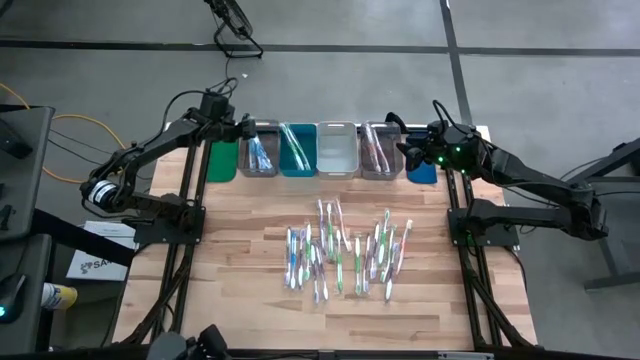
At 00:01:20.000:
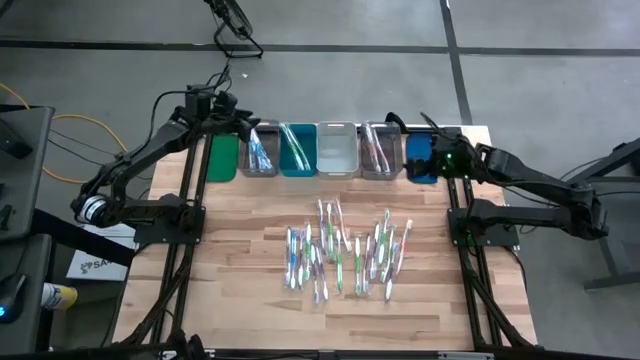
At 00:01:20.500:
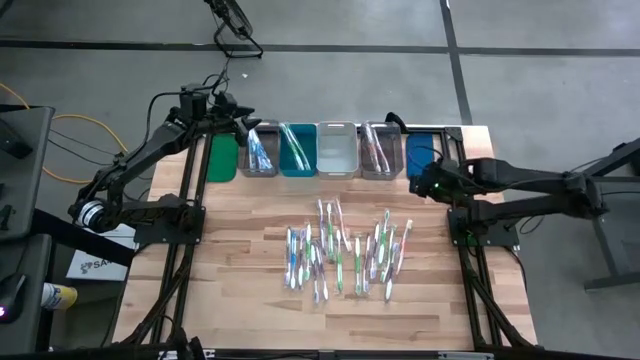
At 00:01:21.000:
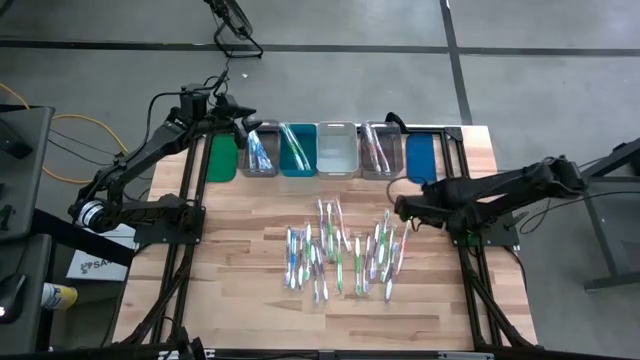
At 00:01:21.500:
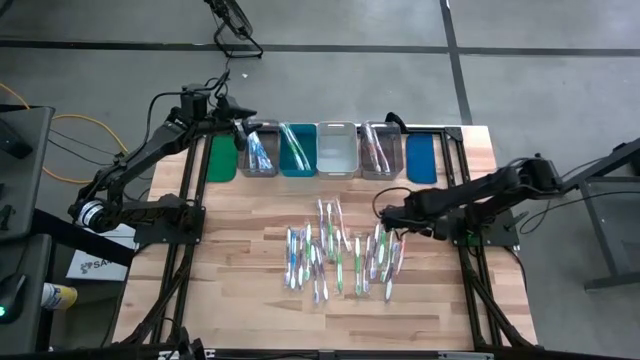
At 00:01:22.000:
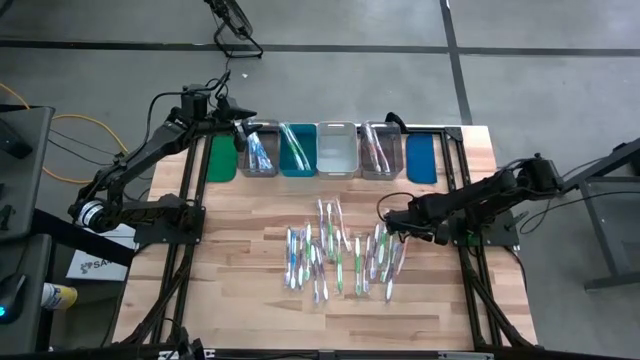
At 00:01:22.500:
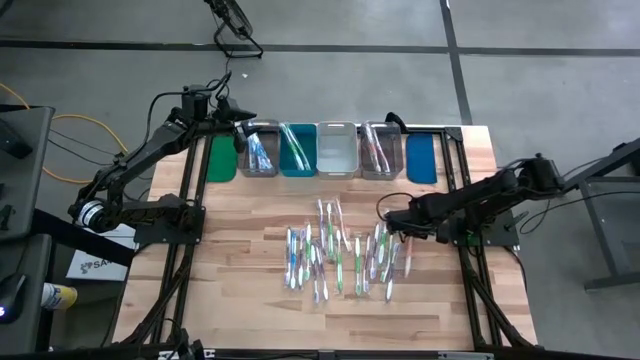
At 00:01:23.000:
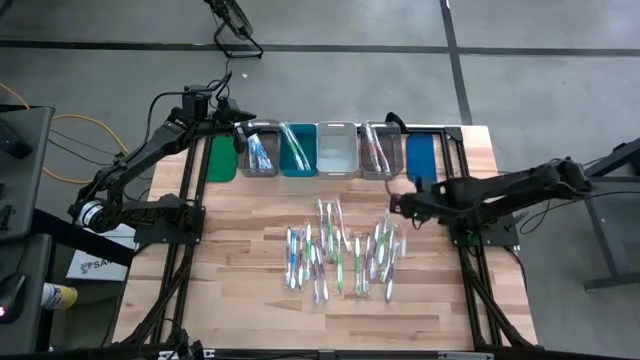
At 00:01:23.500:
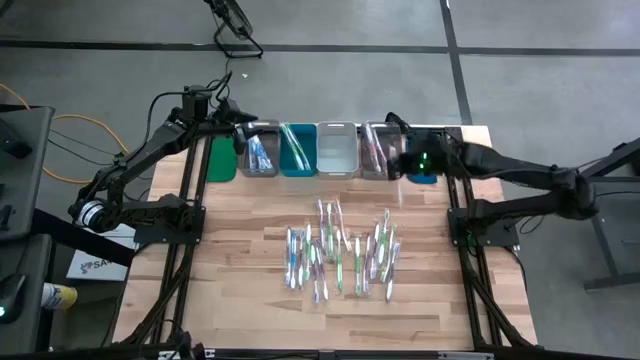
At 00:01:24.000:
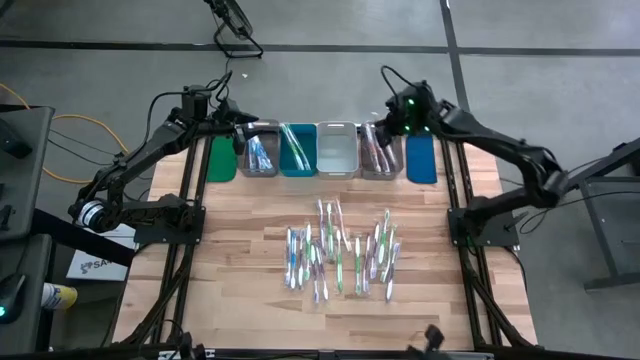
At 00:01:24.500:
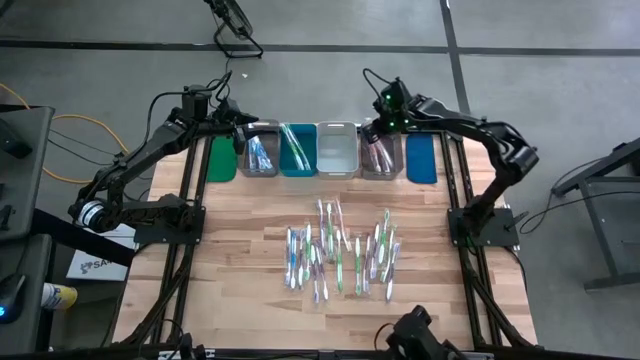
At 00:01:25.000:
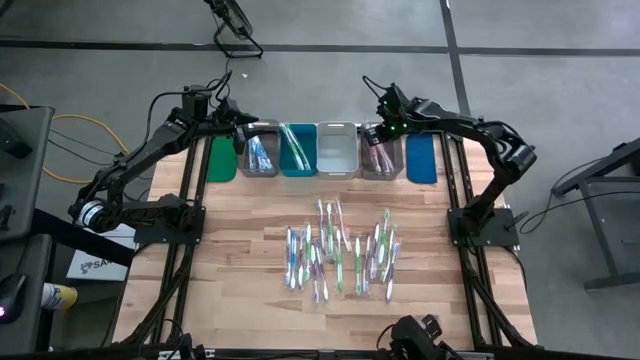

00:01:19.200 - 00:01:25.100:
Task: Pick & Place Toothbrushes
Put the orange toothbrush into the right black bin

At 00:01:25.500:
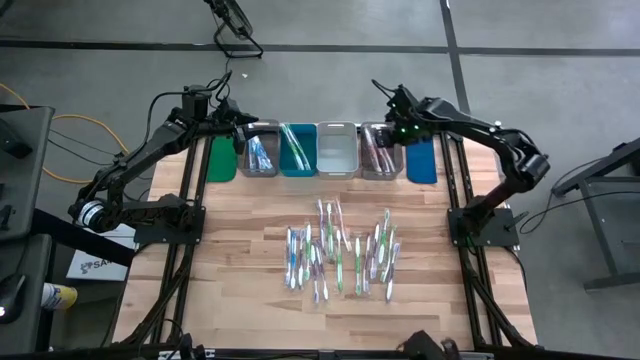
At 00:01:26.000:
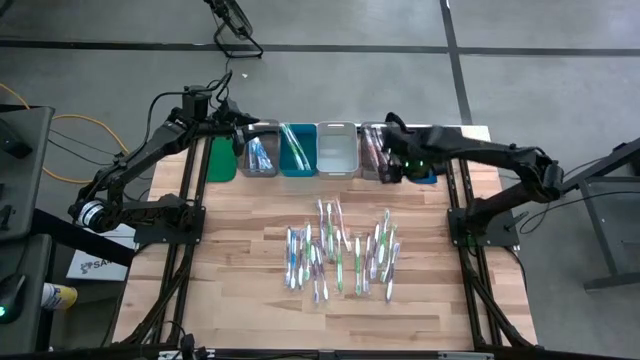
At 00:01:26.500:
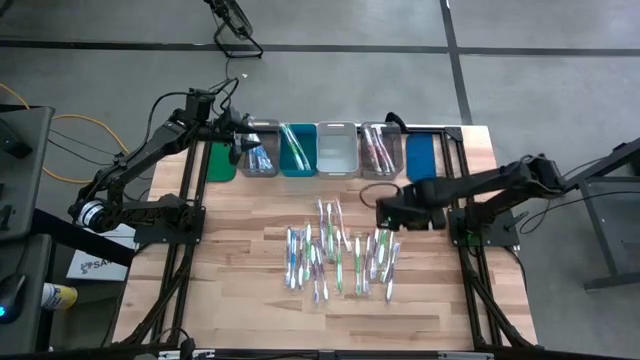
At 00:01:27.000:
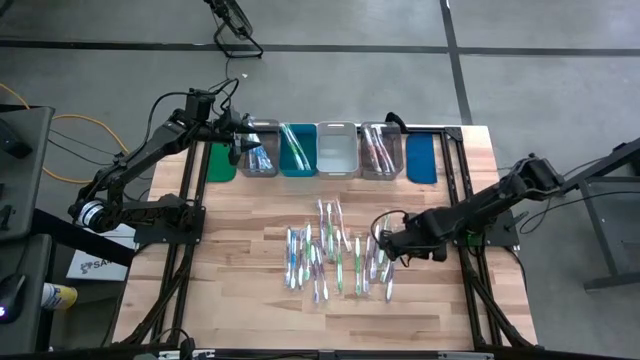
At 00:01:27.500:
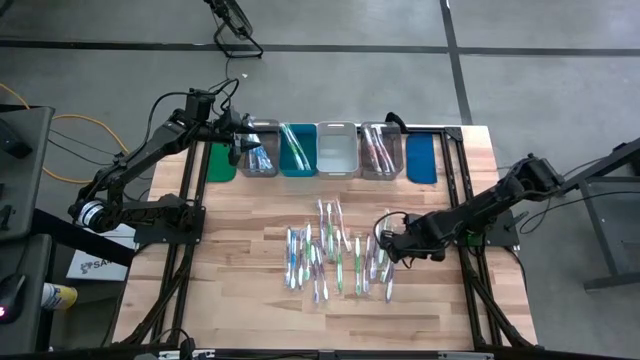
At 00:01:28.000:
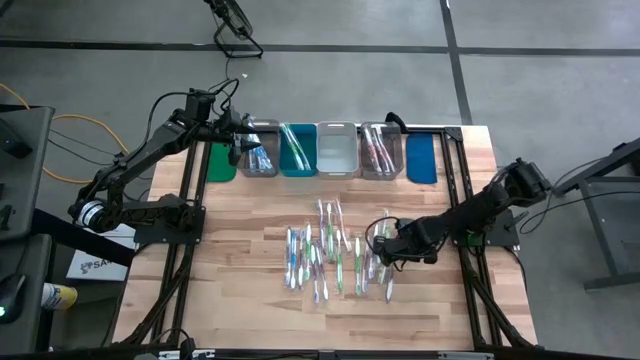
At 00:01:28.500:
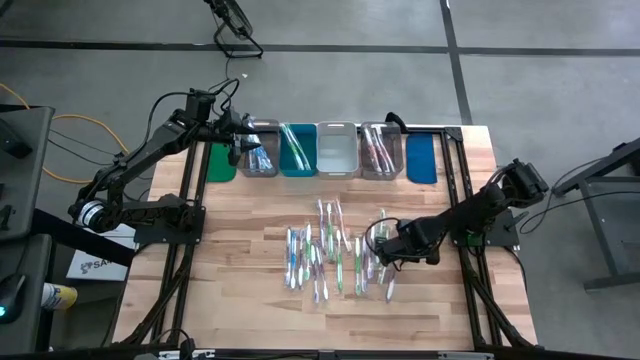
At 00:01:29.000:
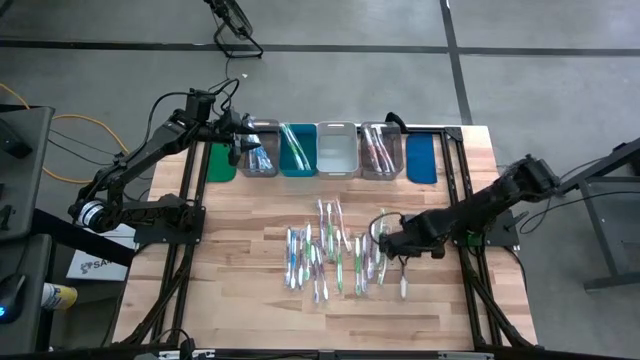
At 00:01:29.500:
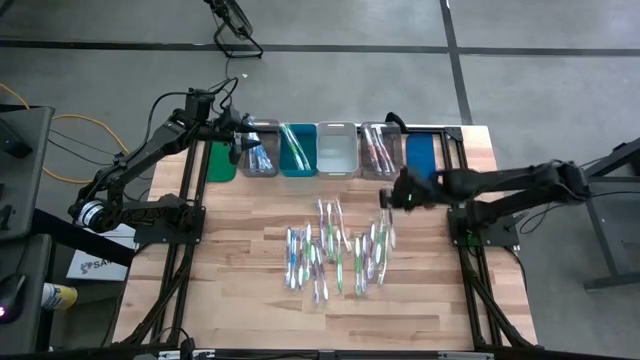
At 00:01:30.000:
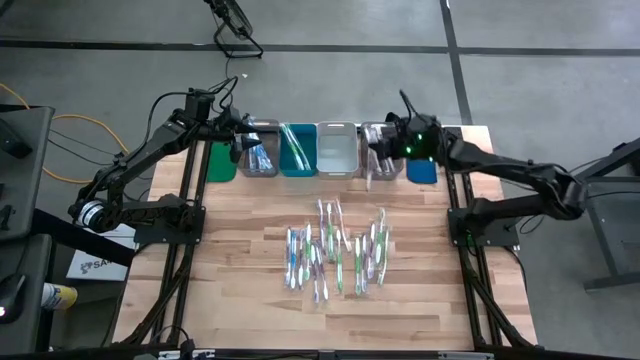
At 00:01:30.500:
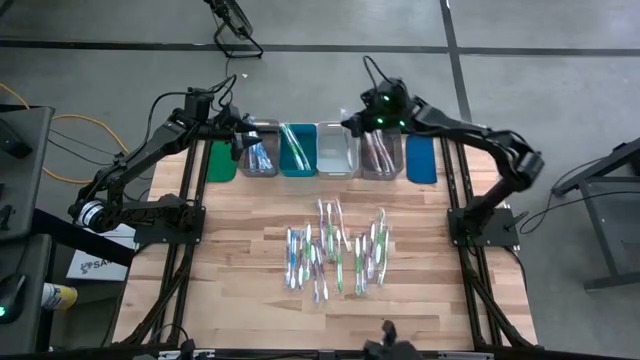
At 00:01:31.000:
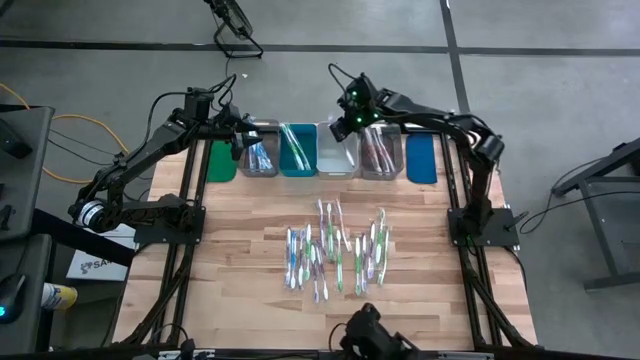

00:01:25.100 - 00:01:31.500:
Put the purple toothbrush into the white bin

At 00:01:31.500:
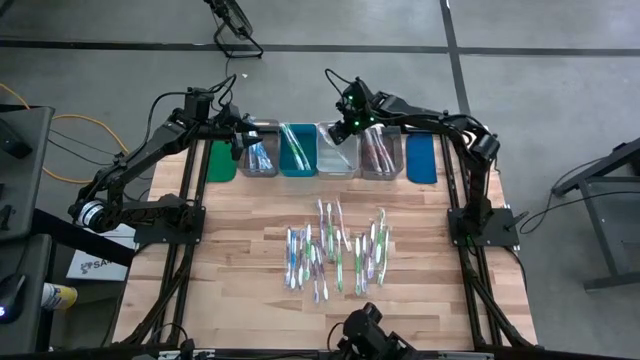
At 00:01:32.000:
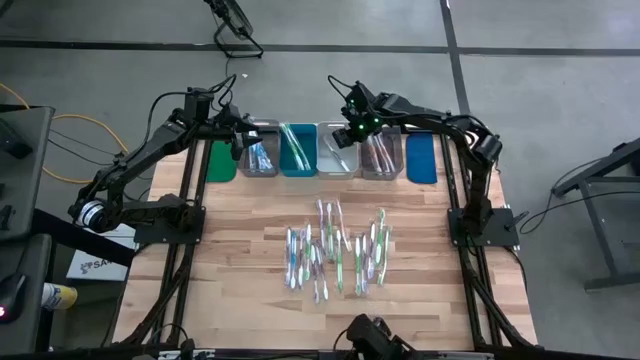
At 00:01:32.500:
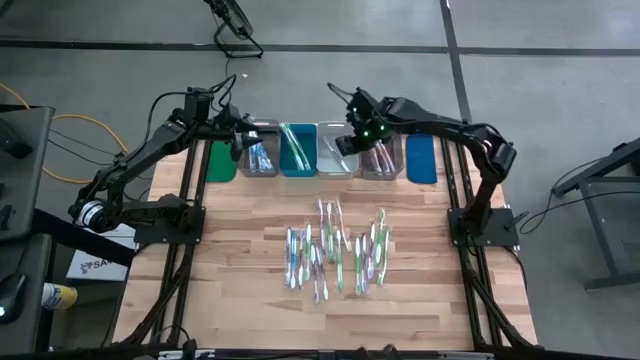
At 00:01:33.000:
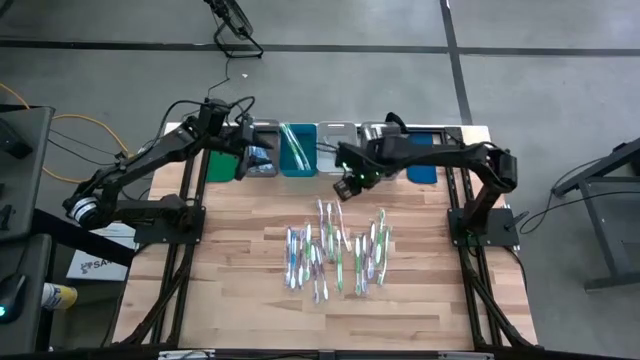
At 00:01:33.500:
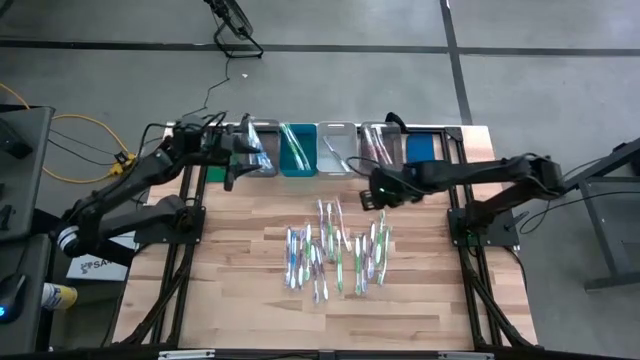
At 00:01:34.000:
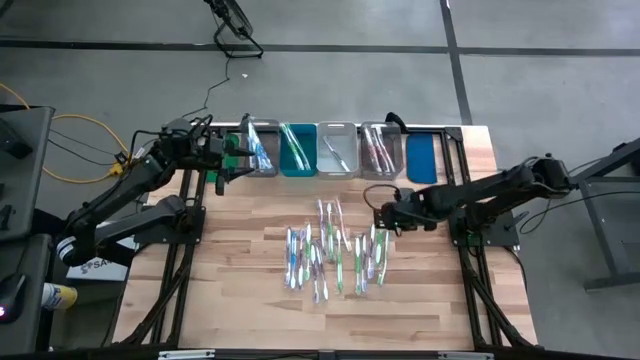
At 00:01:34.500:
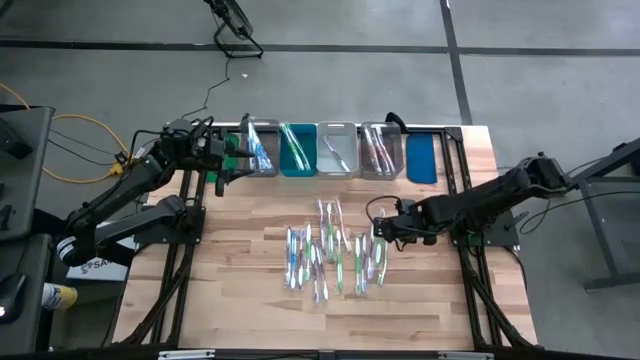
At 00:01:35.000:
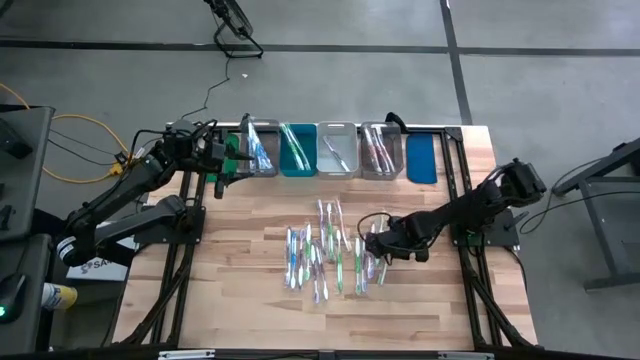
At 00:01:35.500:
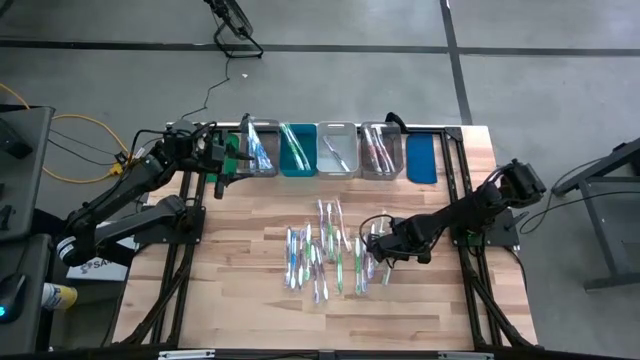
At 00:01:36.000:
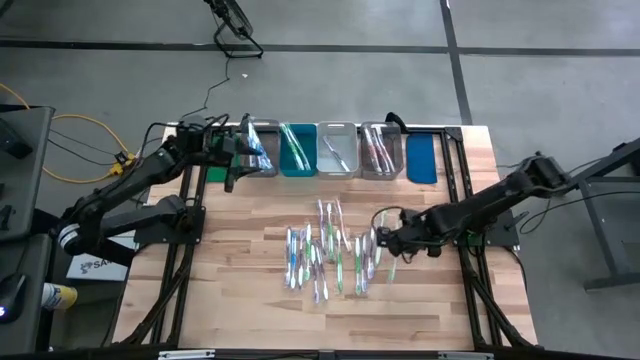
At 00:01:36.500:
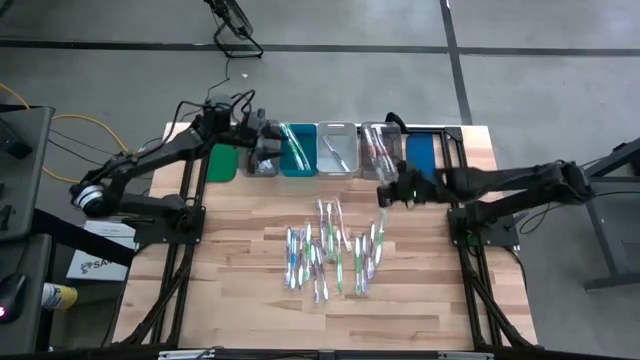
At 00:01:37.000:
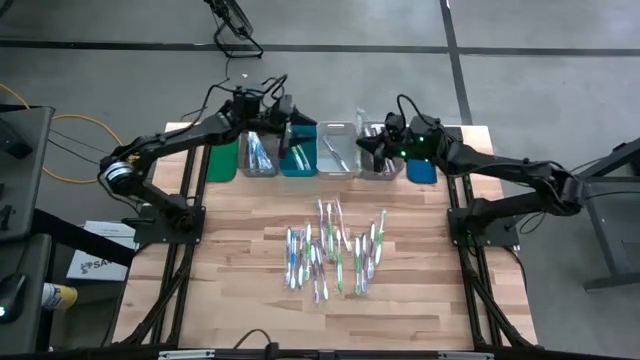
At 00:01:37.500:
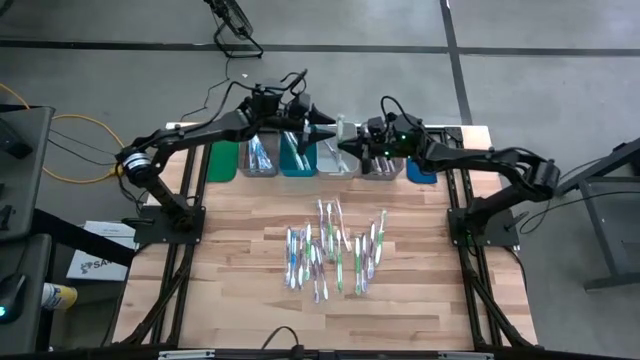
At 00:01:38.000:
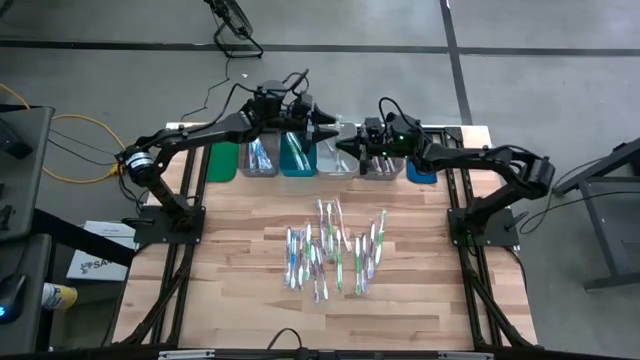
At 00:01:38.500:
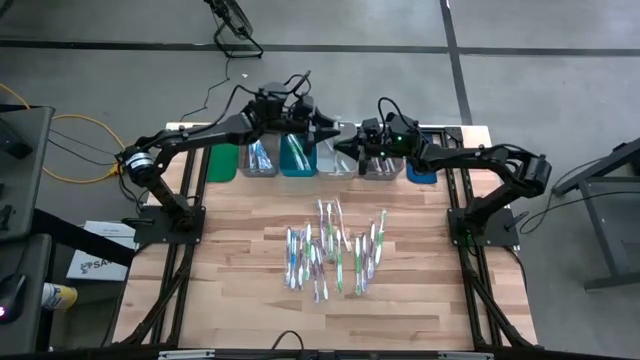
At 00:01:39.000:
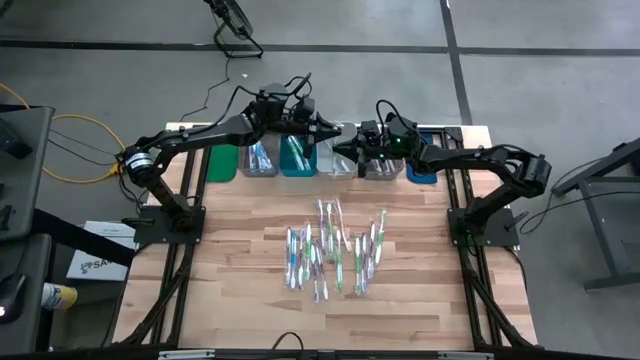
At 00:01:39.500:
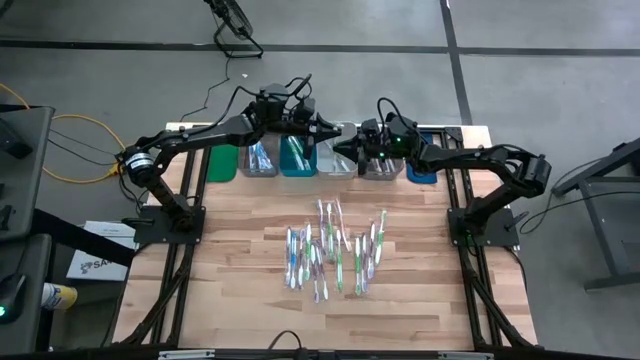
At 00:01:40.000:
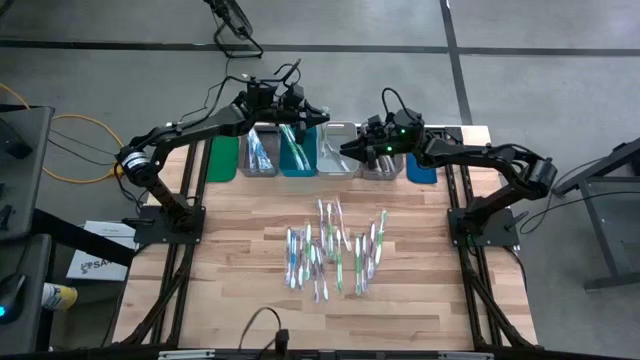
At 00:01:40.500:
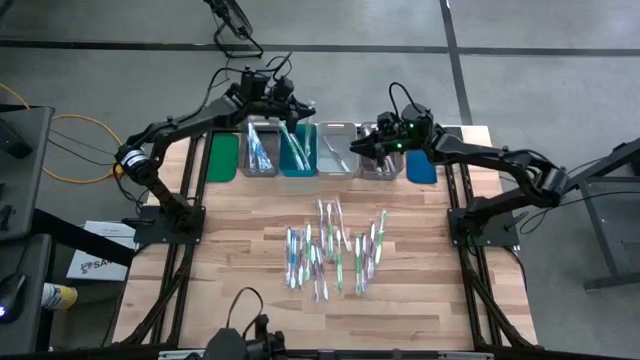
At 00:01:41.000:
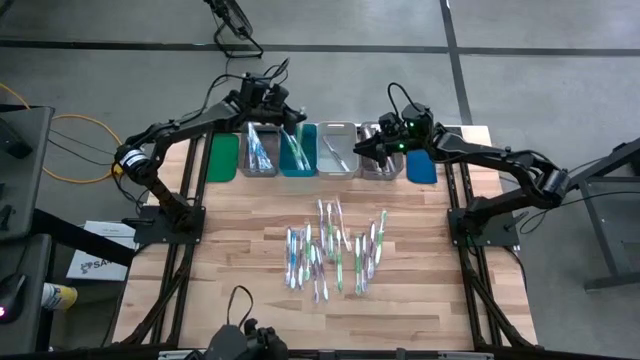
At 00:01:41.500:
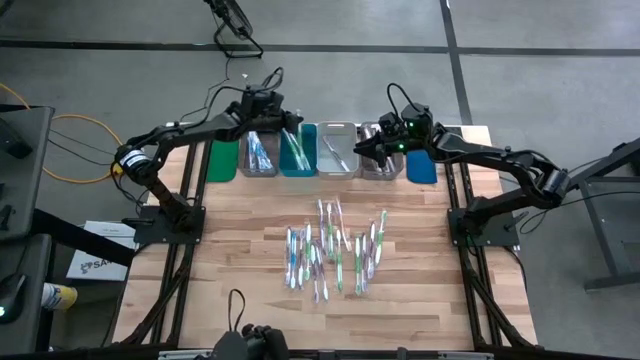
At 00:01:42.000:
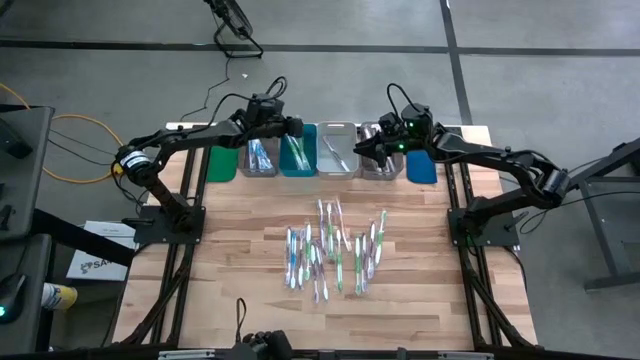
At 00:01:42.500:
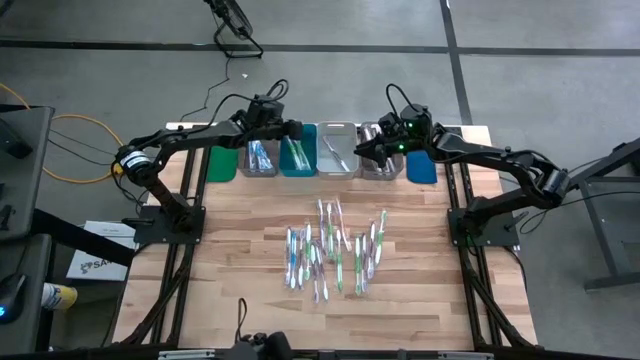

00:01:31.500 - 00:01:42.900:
Put the green toothbrush into the blue bin
